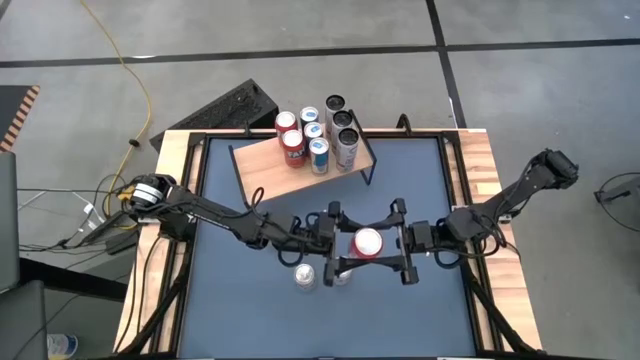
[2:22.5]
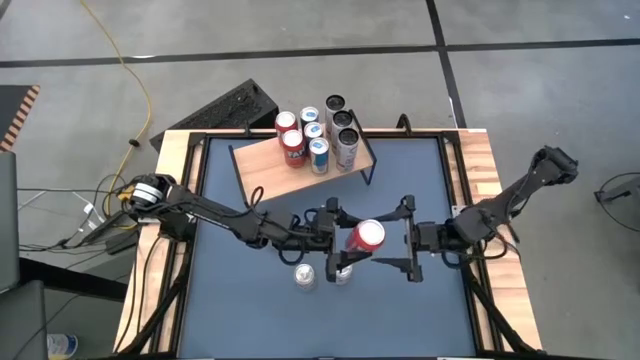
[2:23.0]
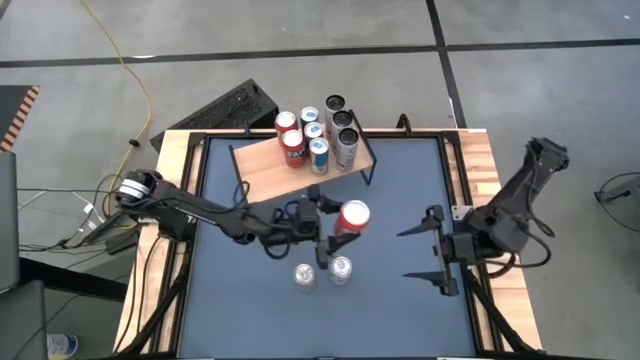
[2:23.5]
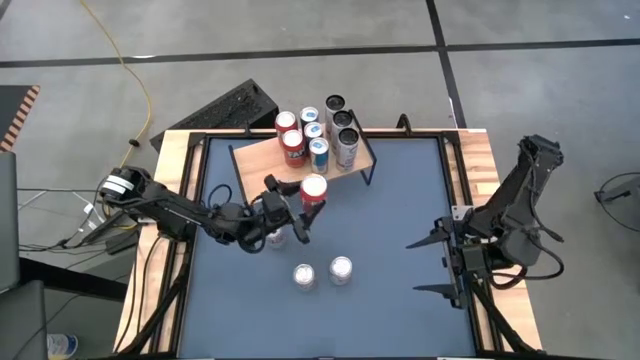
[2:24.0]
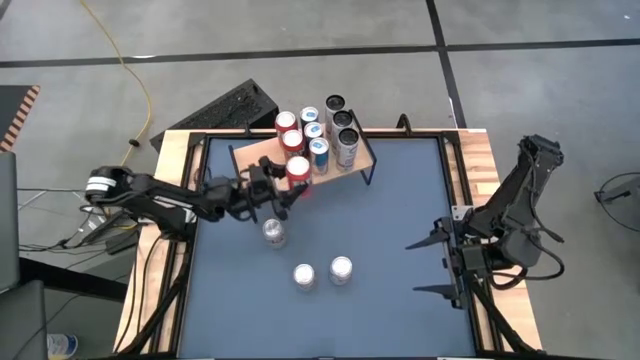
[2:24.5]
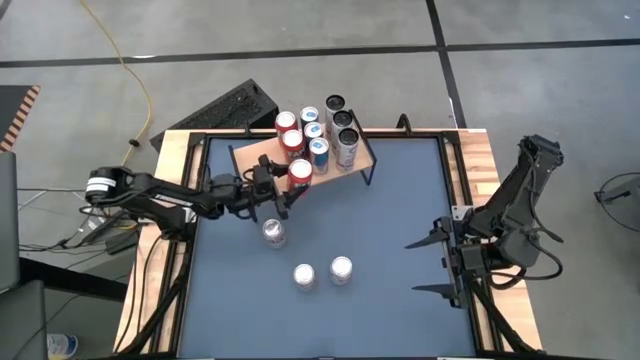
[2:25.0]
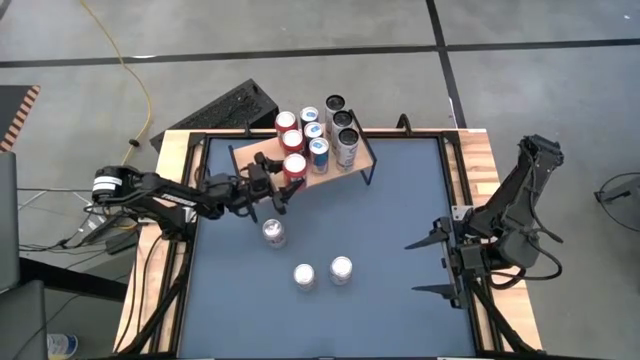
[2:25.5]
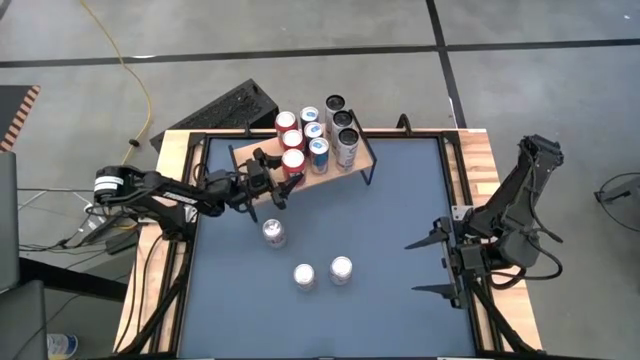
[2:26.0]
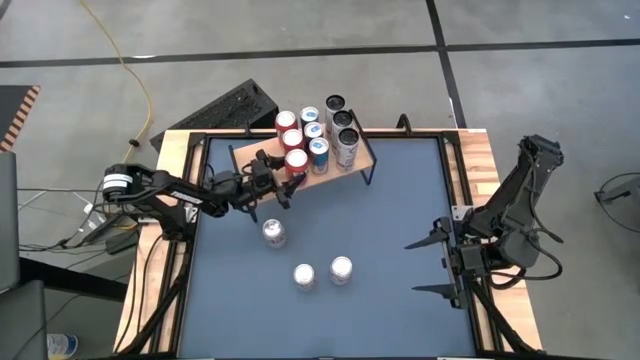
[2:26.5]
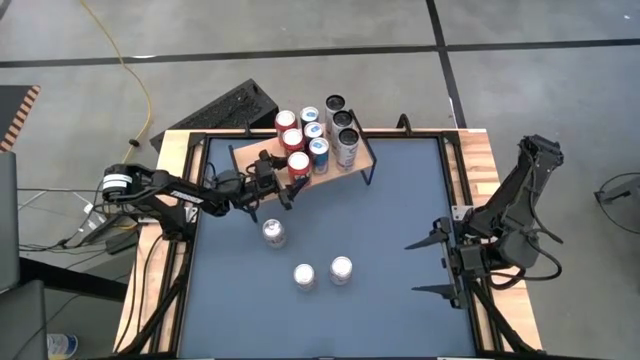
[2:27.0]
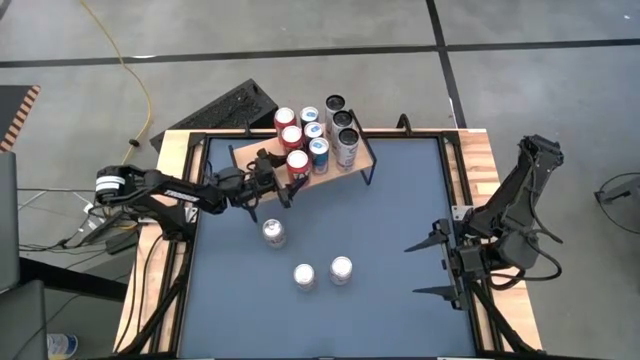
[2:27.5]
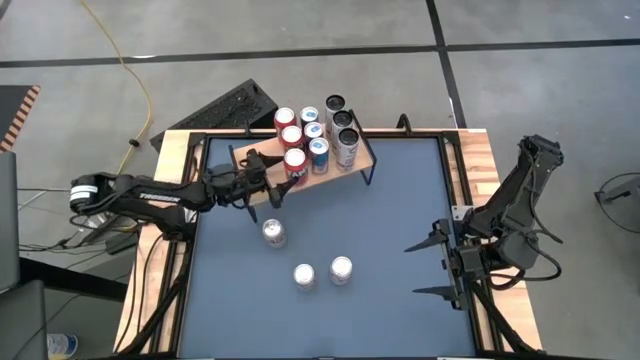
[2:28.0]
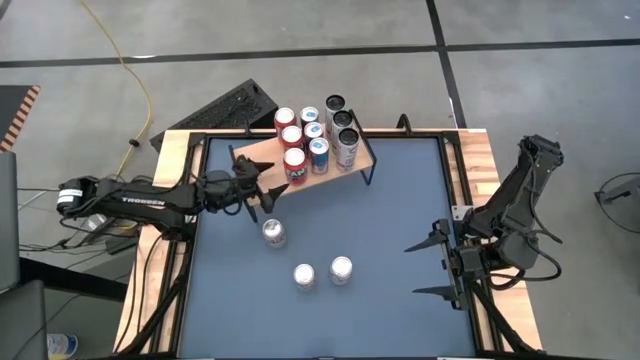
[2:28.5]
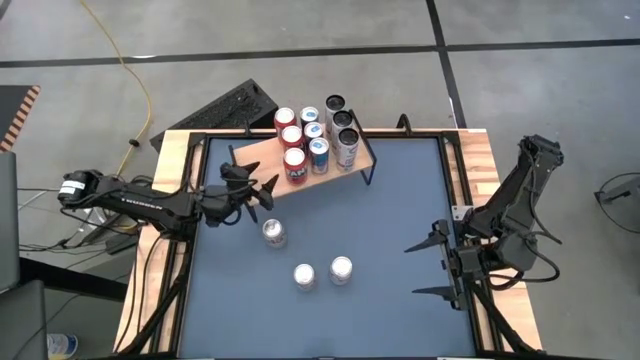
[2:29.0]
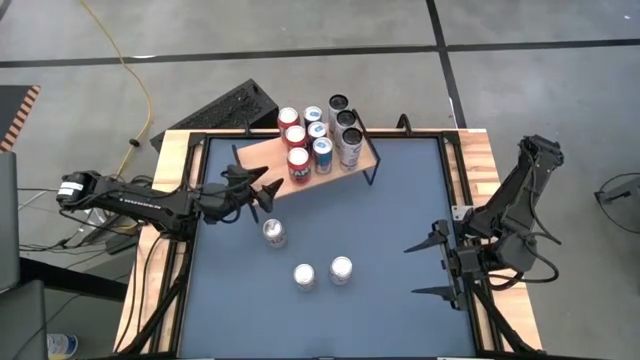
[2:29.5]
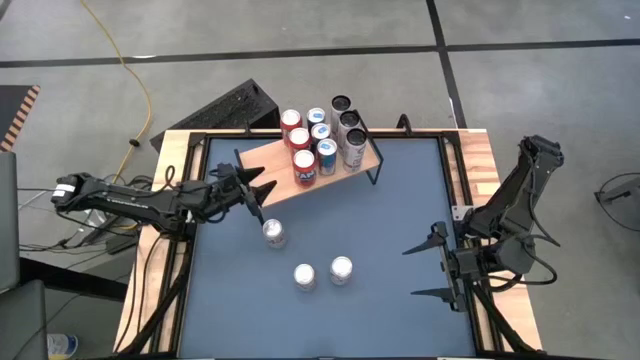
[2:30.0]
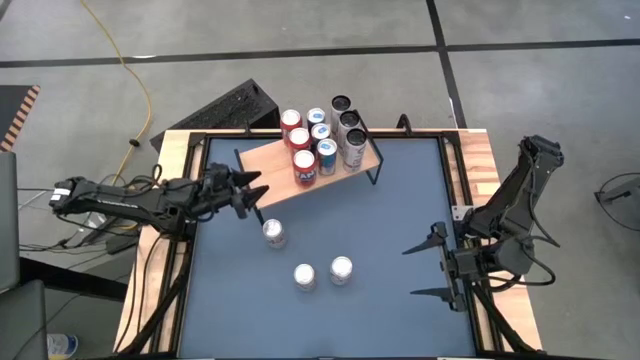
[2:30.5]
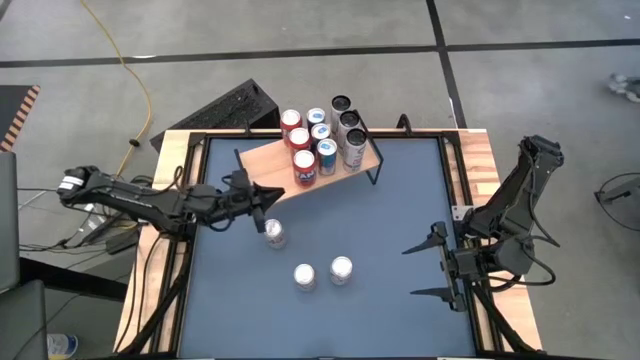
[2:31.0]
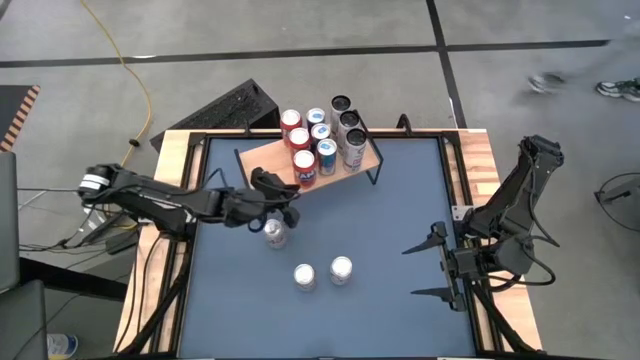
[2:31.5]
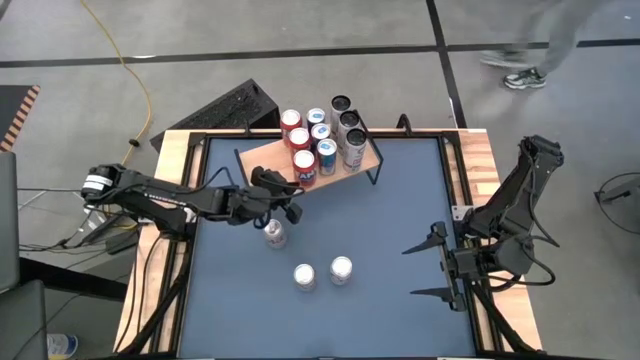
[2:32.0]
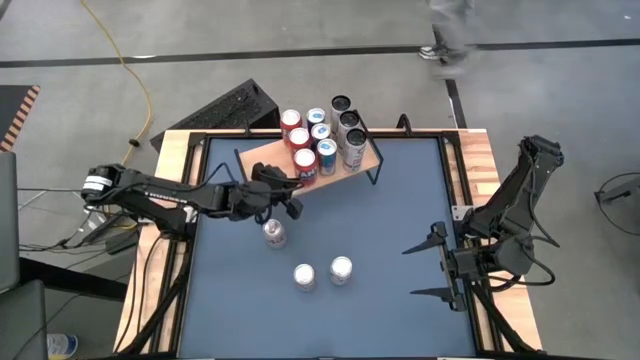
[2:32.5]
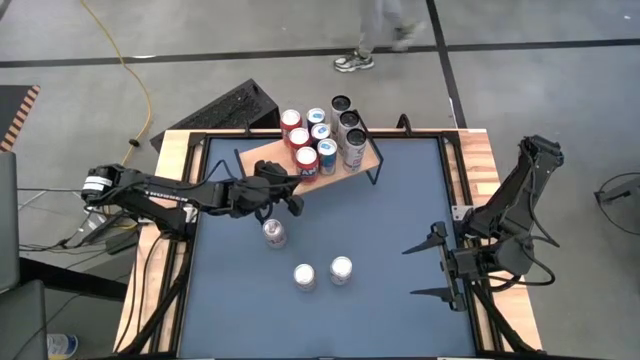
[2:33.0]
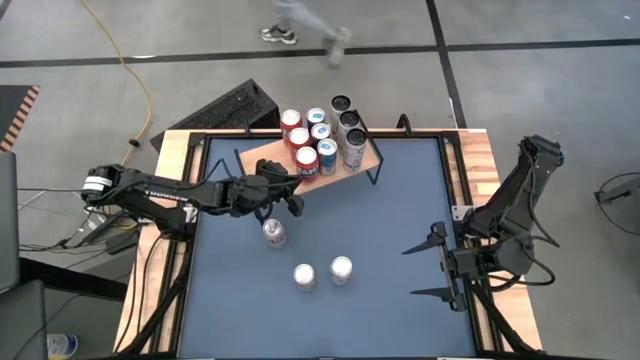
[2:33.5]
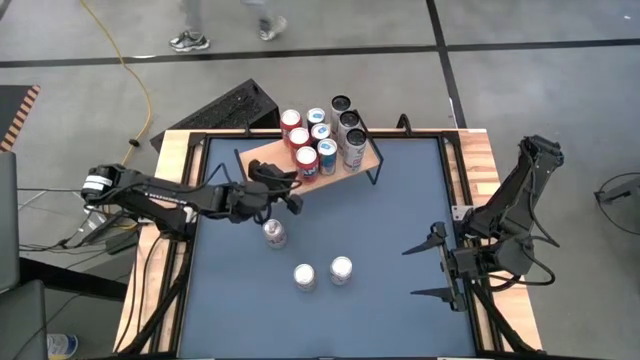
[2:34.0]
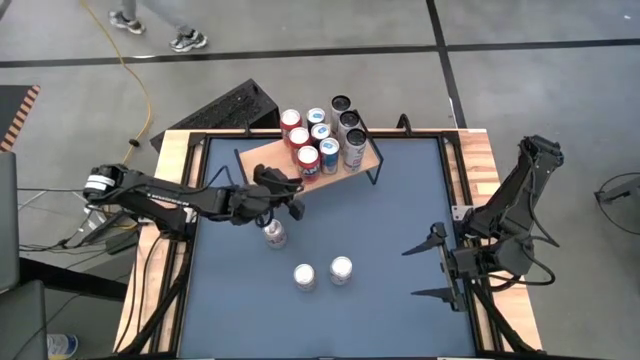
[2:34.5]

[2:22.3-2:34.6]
Task: Place canned beverage on shelf
Put the red soda can on the shelf aligned with the other red soda cans

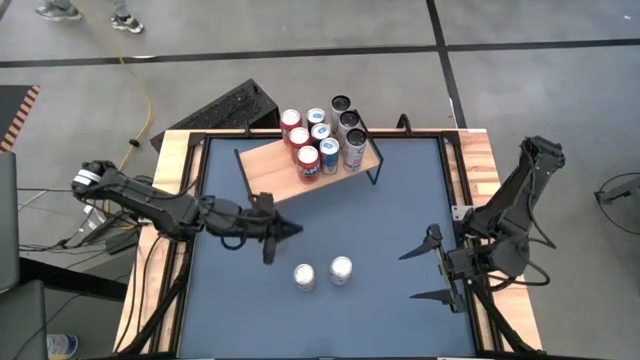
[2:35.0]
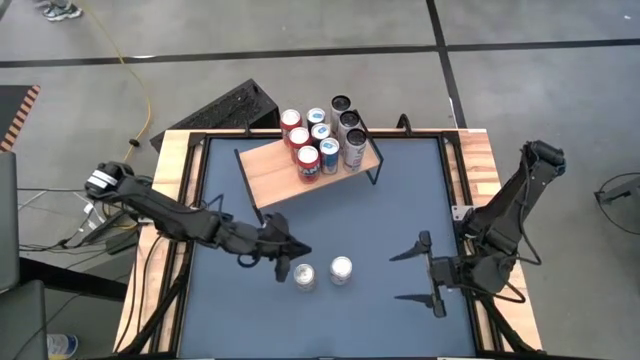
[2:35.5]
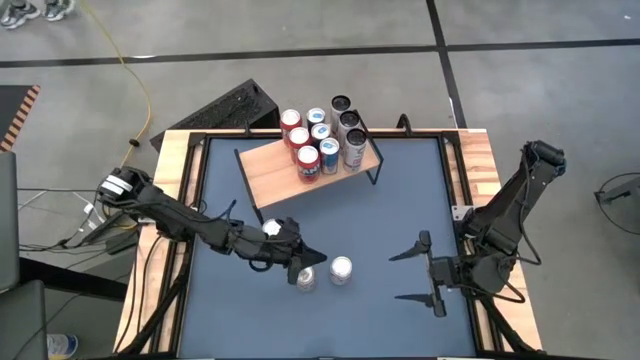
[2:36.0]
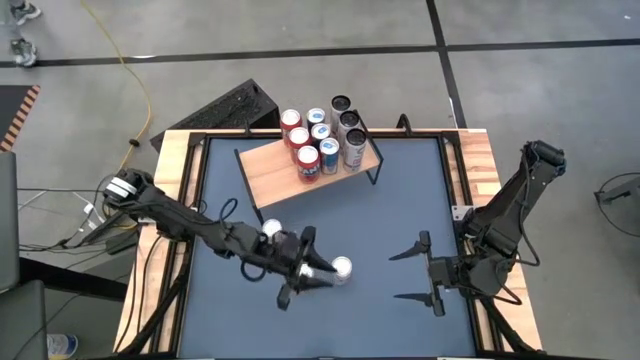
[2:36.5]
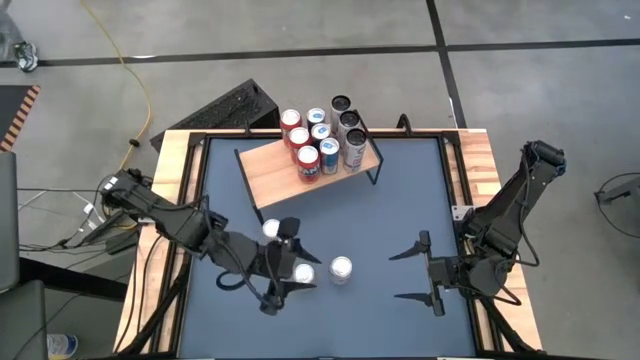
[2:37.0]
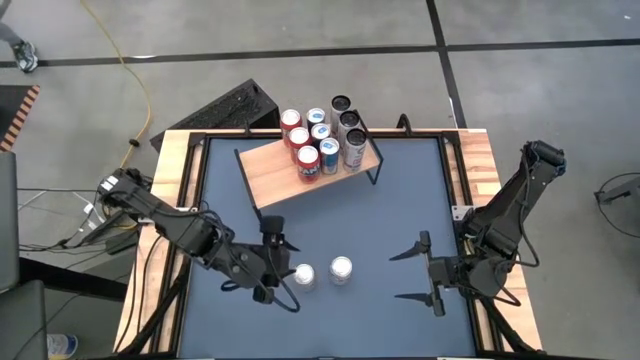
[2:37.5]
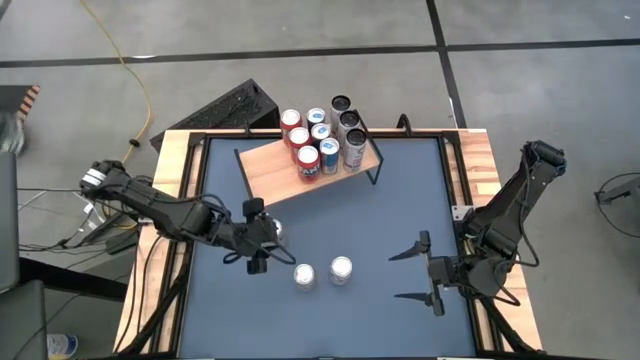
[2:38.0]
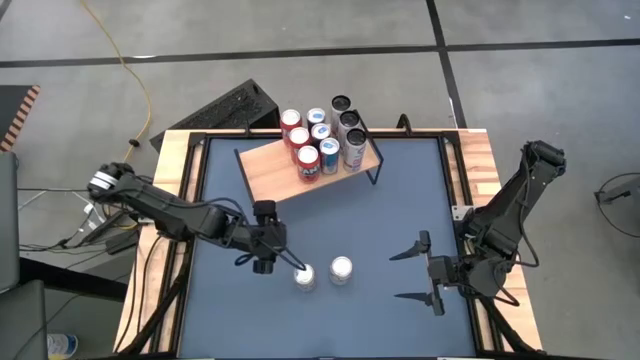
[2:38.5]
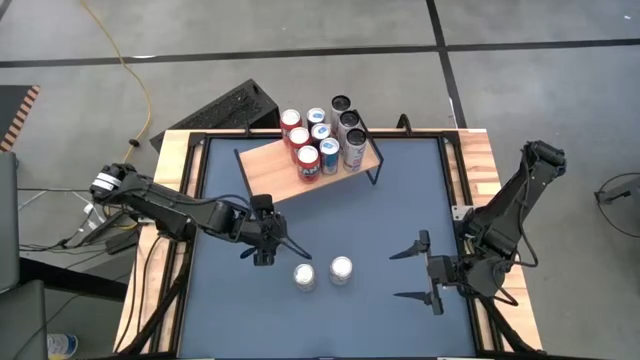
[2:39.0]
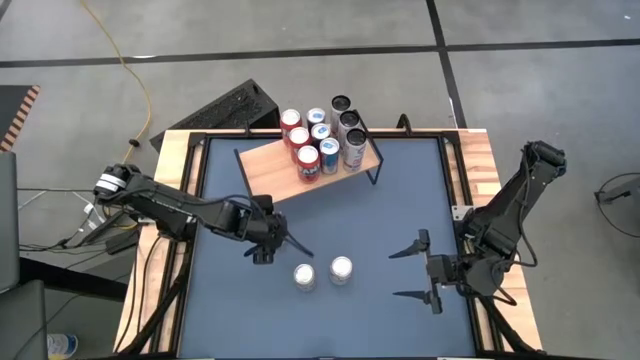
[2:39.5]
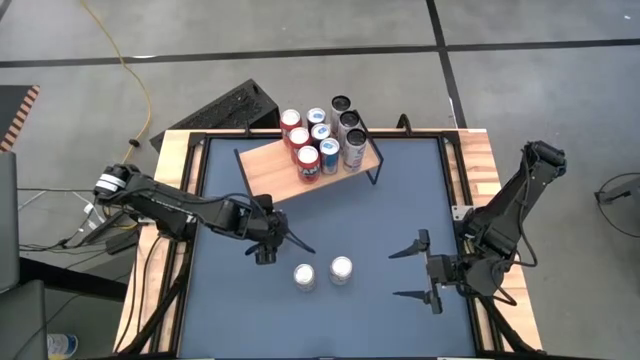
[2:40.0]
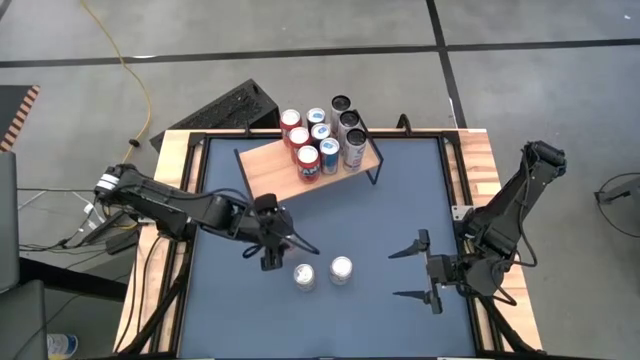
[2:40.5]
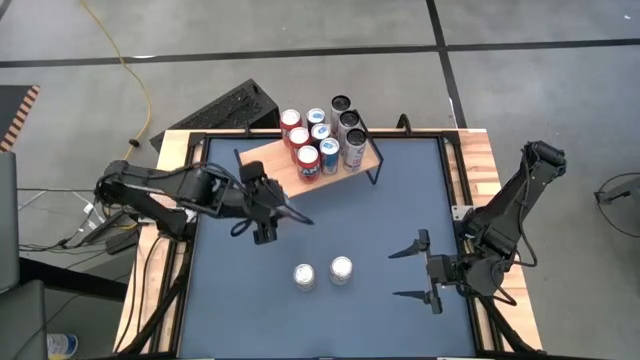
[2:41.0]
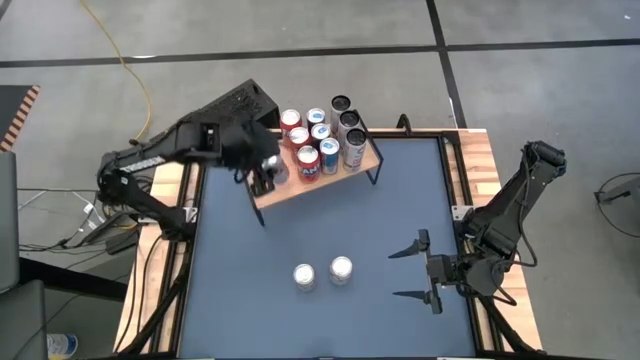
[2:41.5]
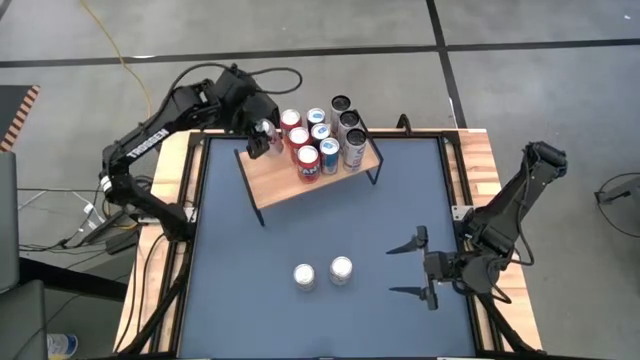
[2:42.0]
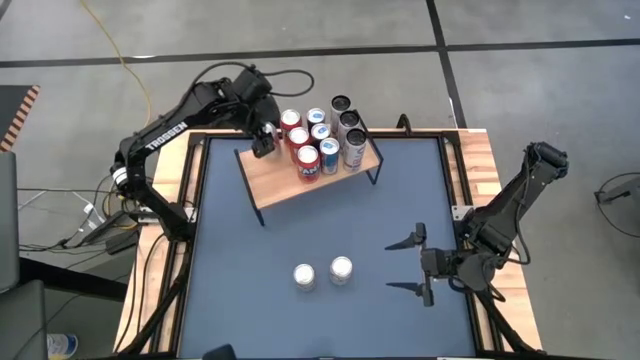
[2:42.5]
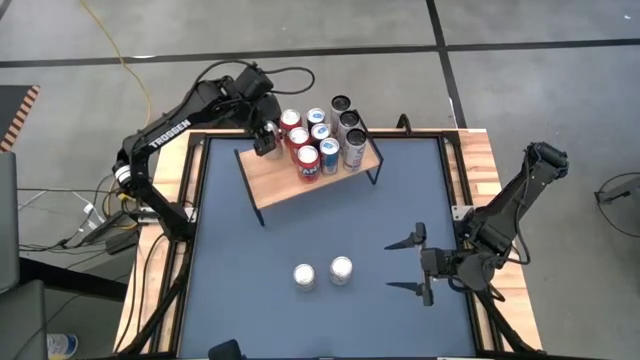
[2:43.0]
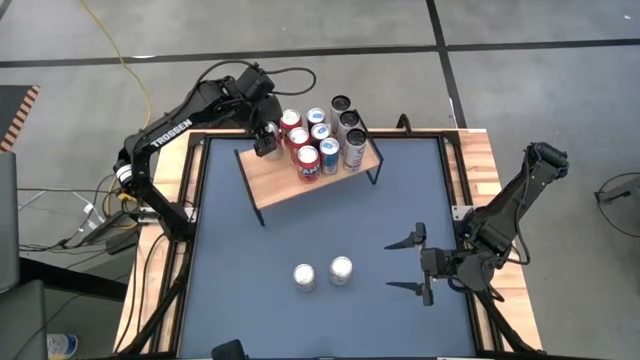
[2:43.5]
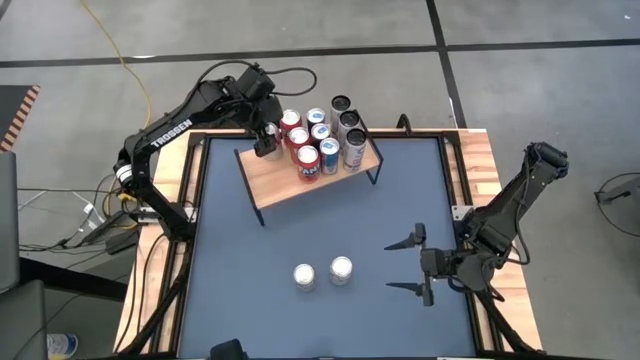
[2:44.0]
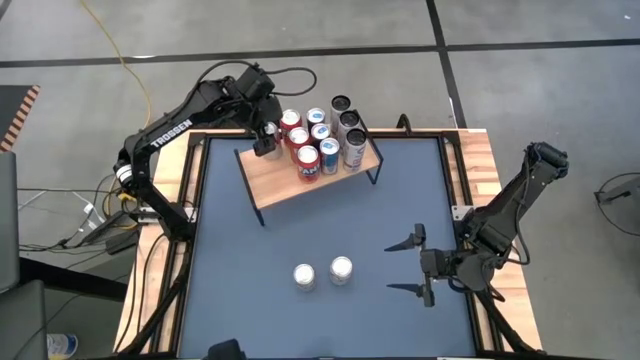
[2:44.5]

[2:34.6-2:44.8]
Put the top silver soda can on the shelf
